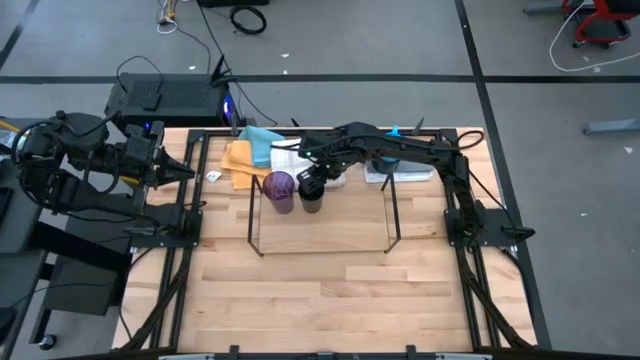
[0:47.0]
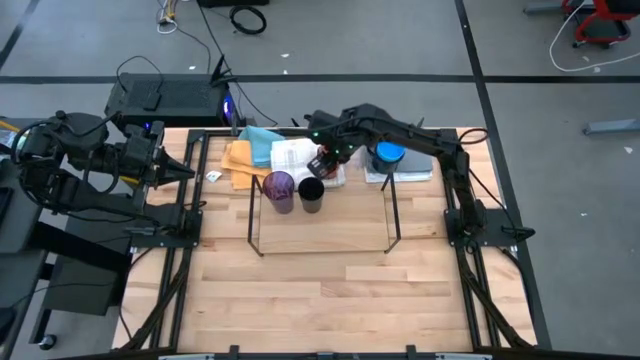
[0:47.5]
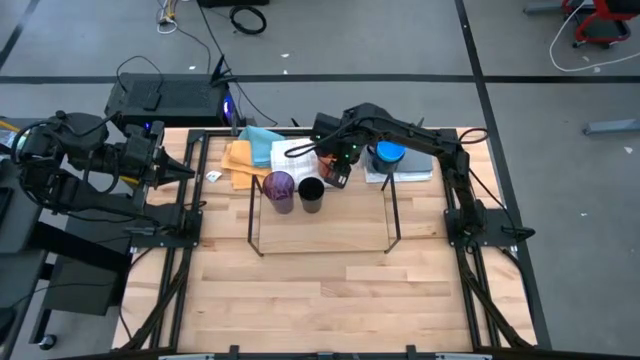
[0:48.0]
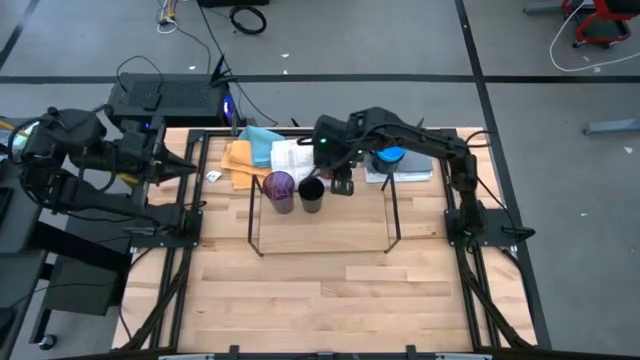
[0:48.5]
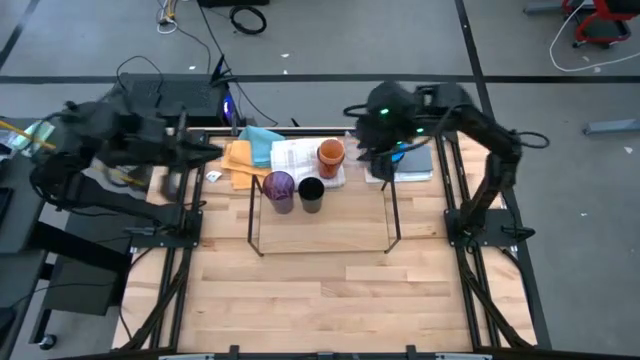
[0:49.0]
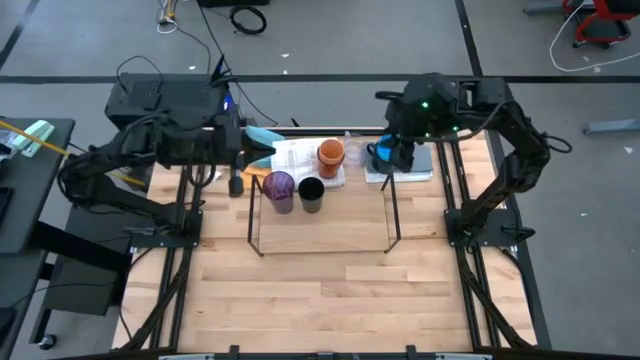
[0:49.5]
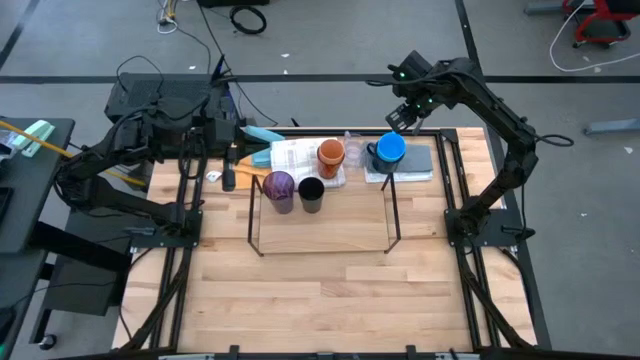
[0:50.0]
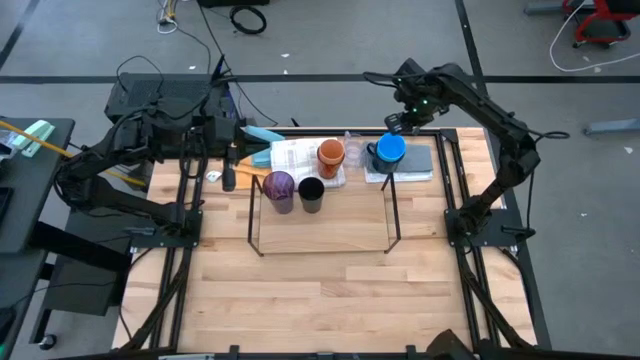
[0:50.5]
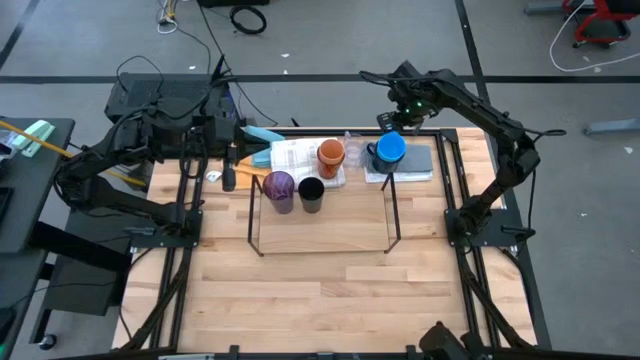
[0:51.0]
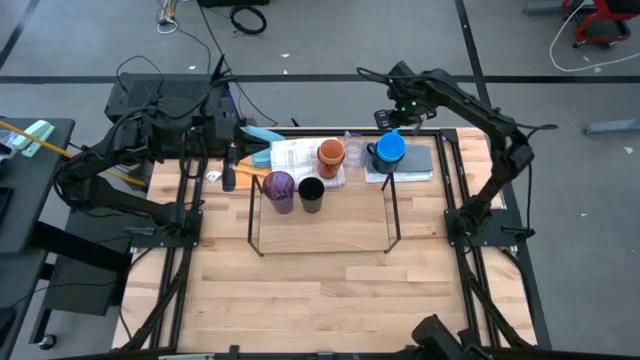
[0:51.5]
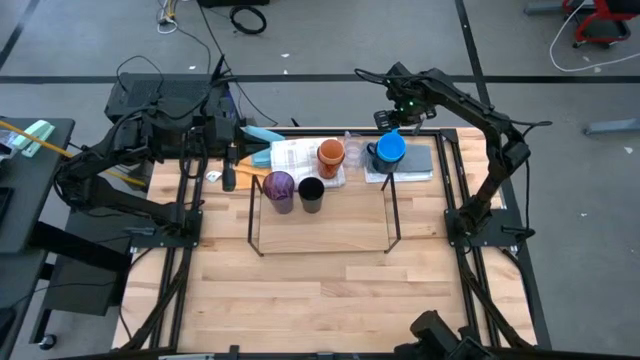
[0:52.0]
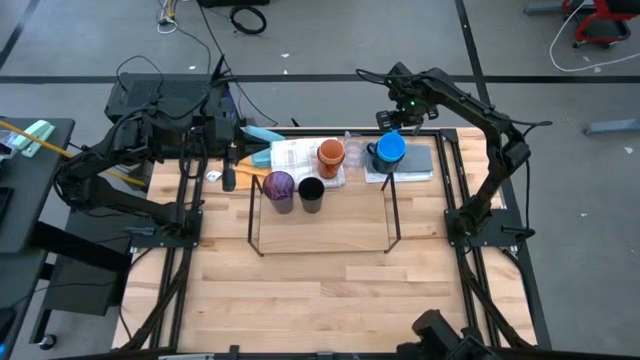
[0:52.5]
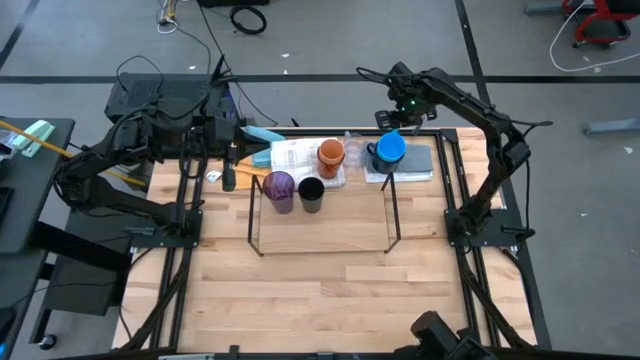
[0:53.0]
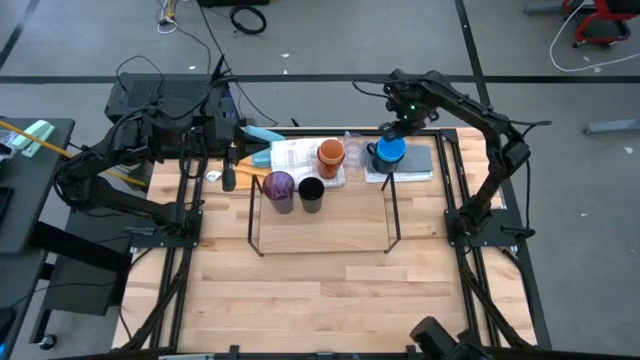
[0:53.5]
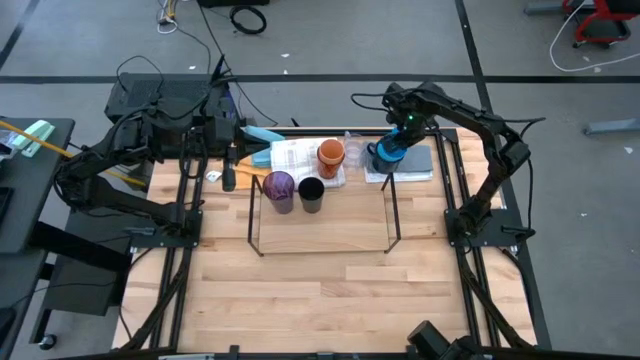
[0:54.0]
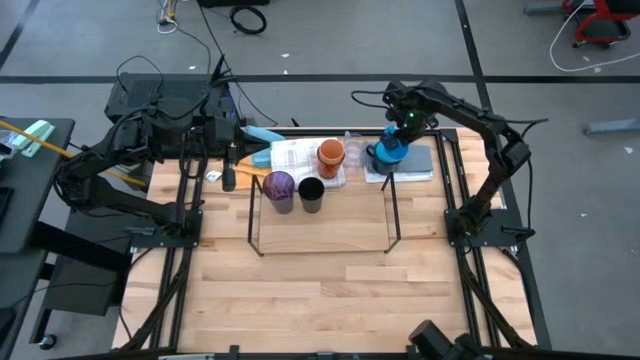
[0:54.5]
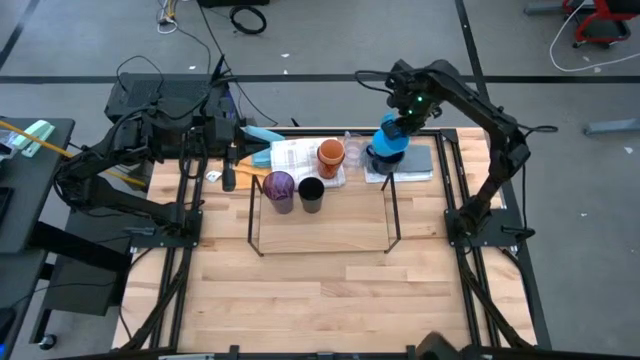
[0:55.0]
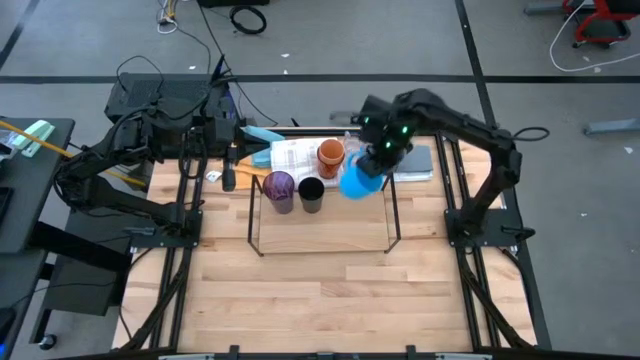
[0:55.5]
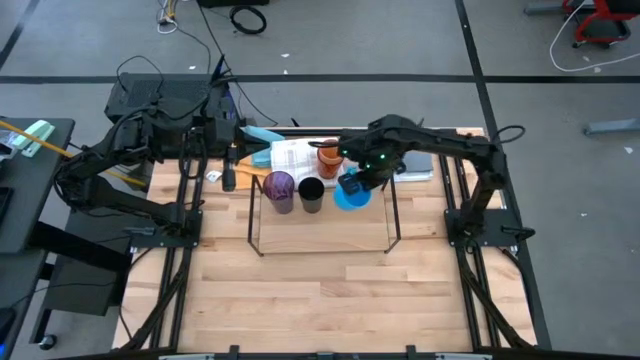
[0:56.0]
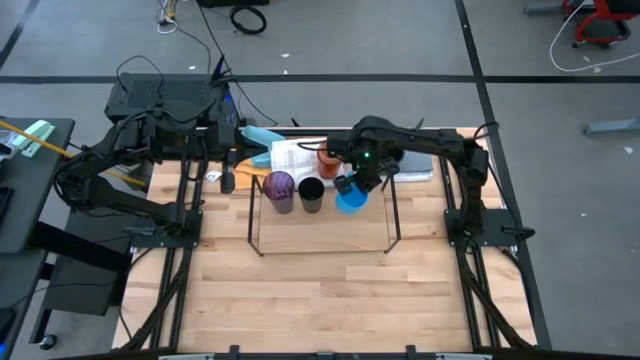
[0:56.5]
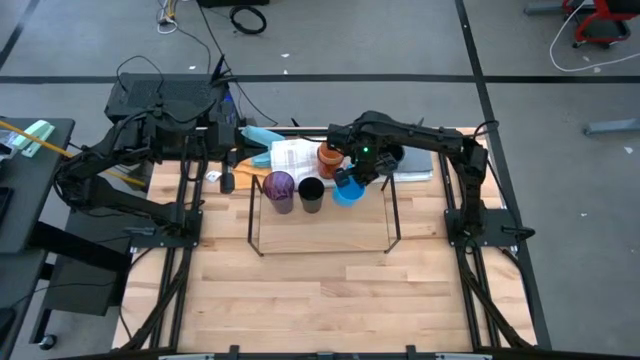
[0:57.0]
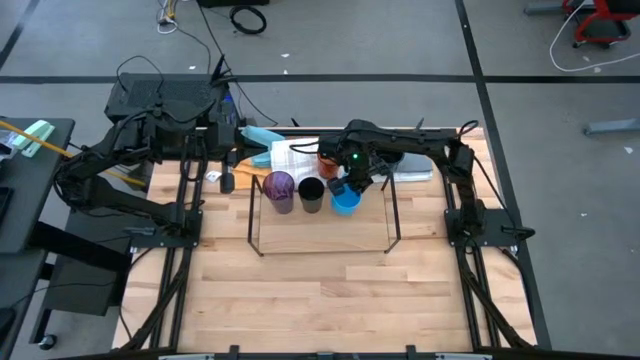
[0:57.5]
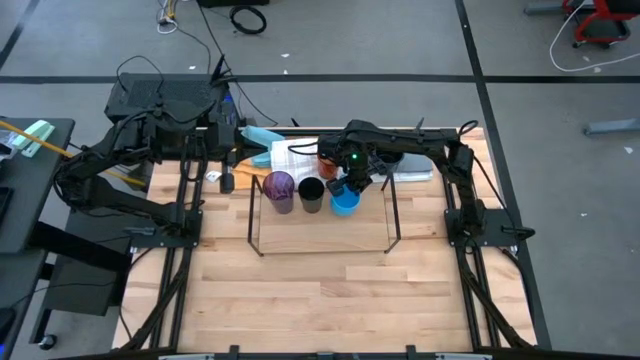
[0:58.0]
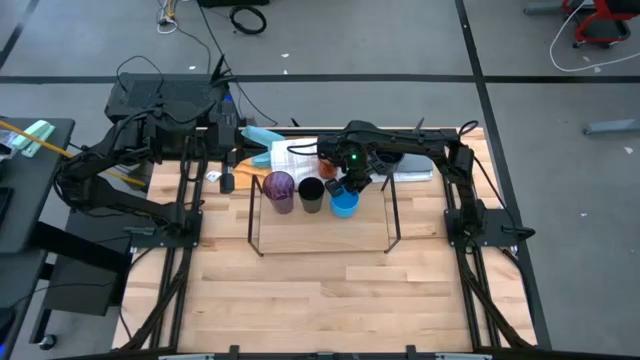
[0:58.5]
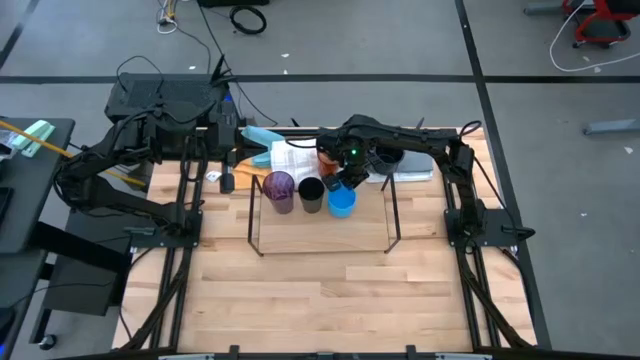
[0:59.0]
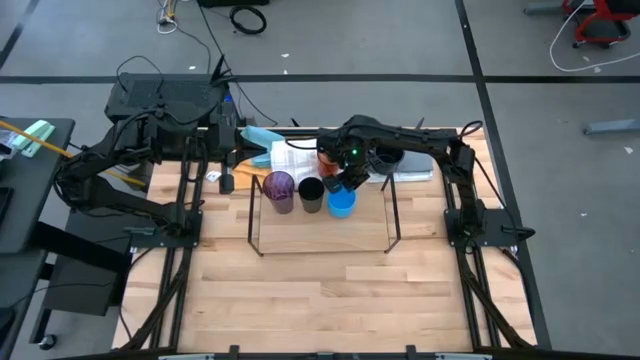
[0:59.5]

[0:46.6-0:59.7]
Task: Stack small to large cups/mugs on shelf
Put the blue mug on the shelf

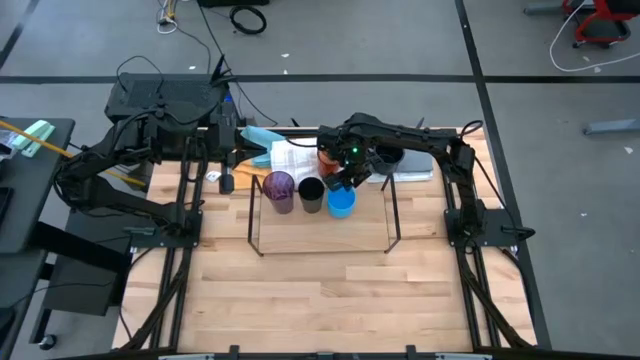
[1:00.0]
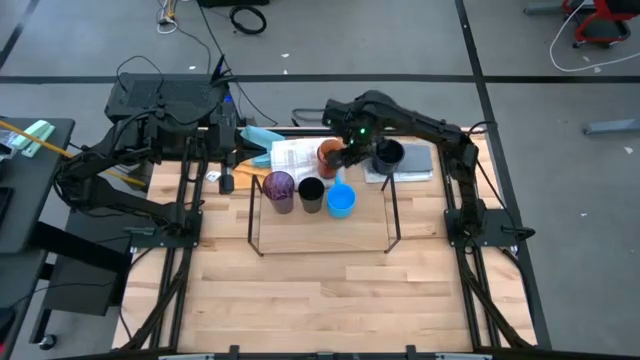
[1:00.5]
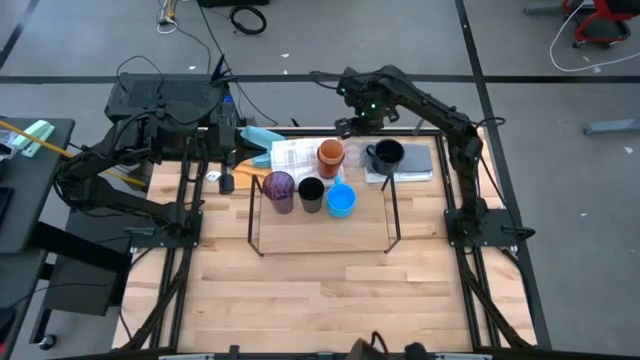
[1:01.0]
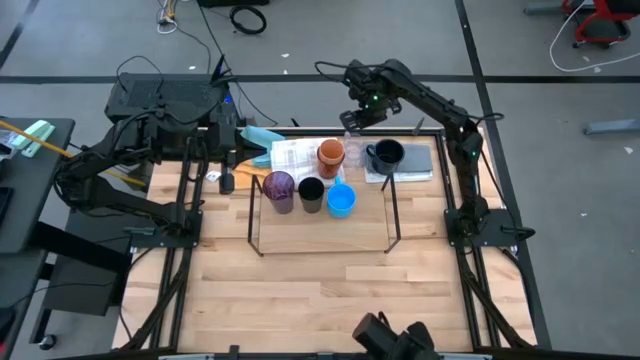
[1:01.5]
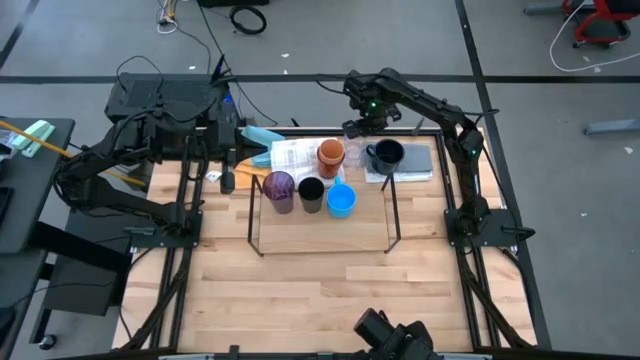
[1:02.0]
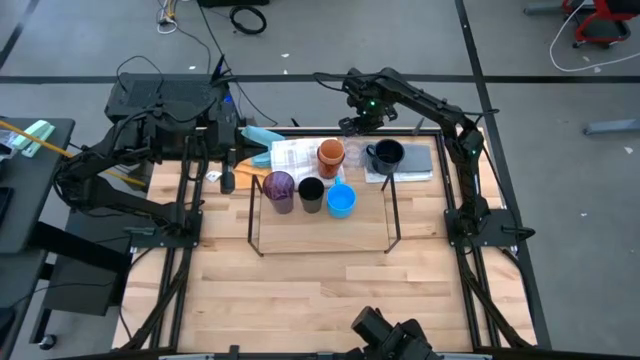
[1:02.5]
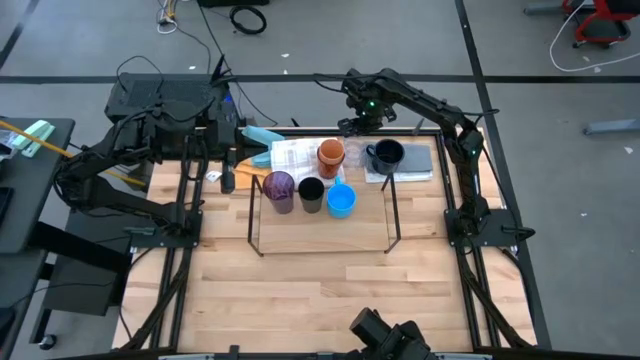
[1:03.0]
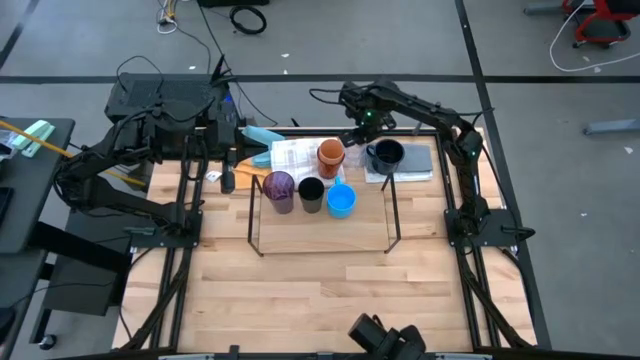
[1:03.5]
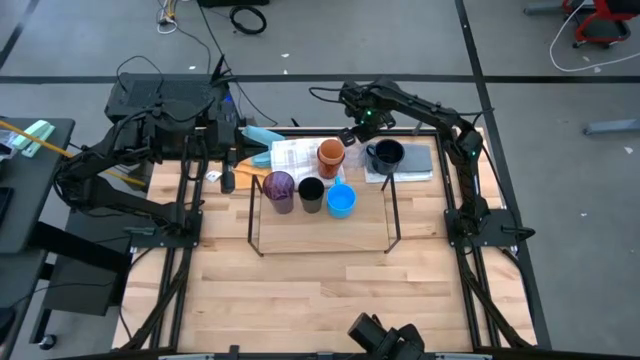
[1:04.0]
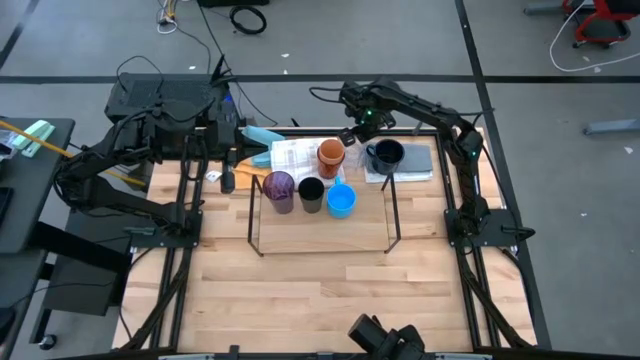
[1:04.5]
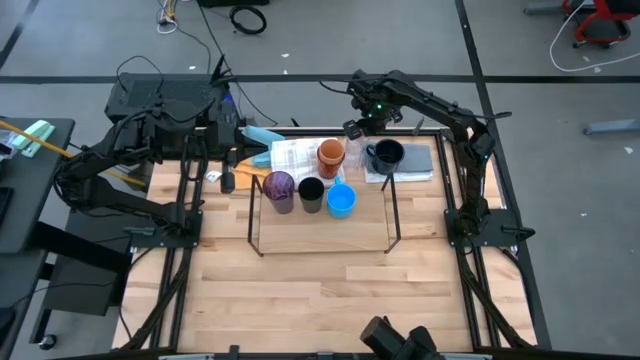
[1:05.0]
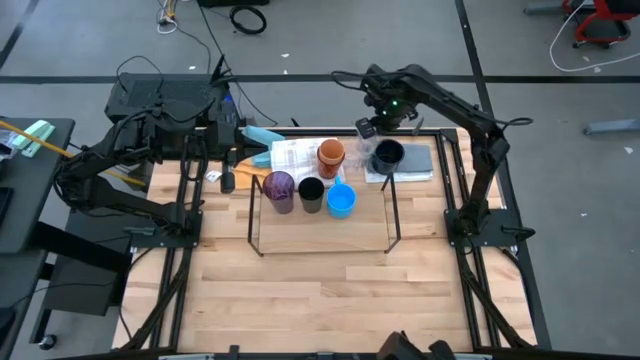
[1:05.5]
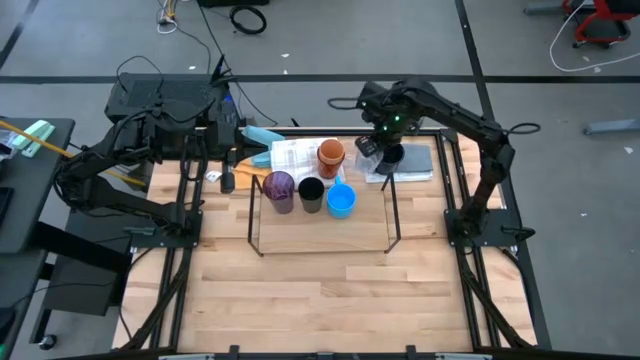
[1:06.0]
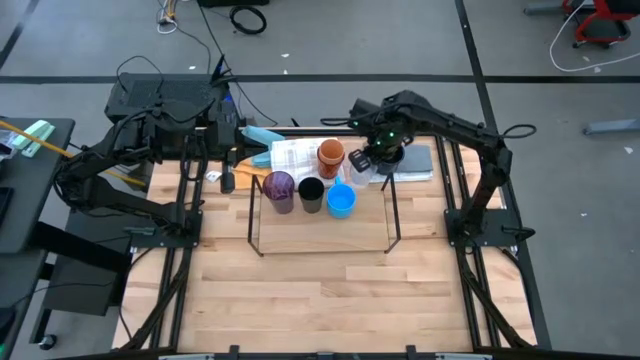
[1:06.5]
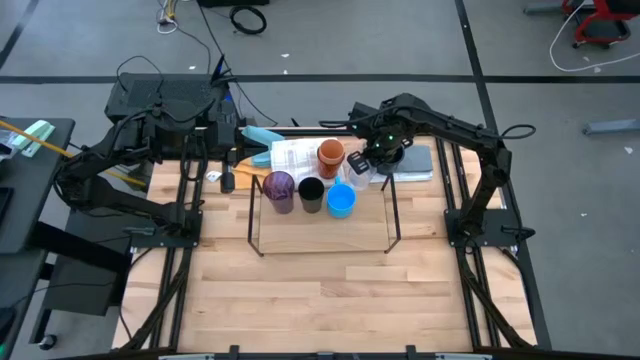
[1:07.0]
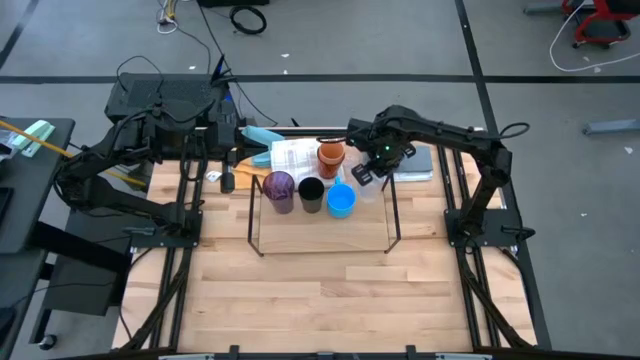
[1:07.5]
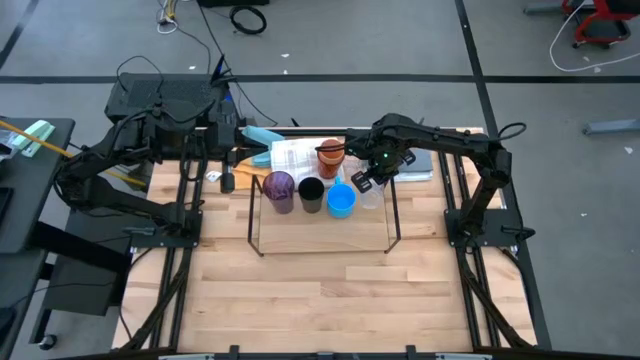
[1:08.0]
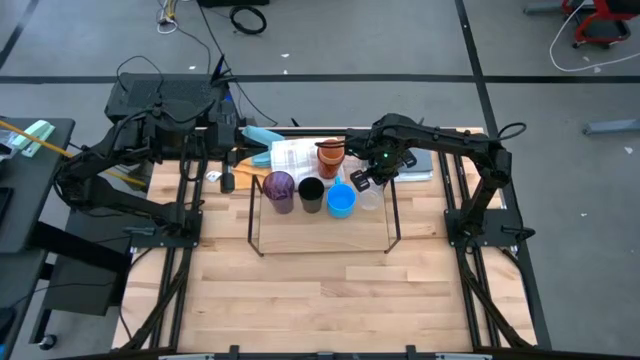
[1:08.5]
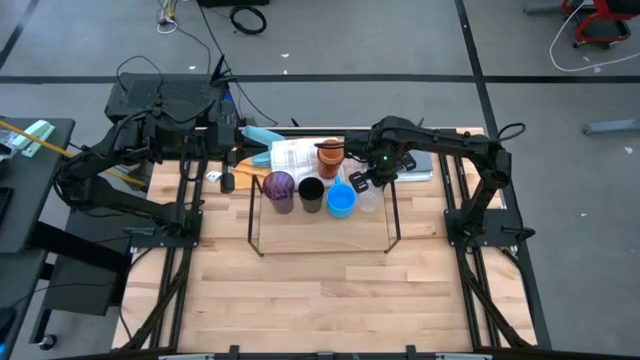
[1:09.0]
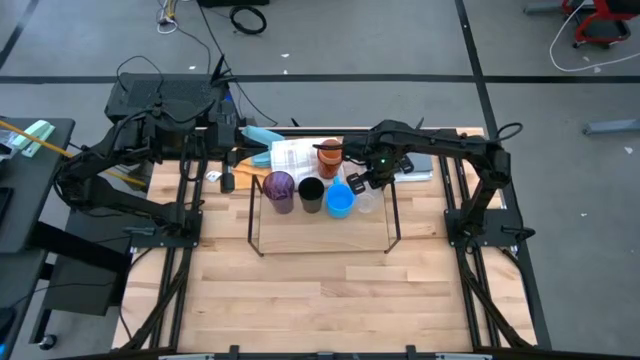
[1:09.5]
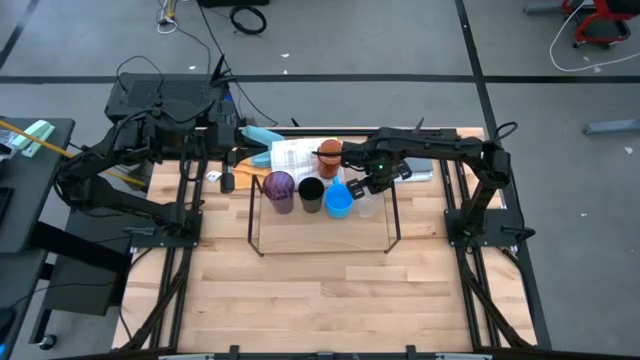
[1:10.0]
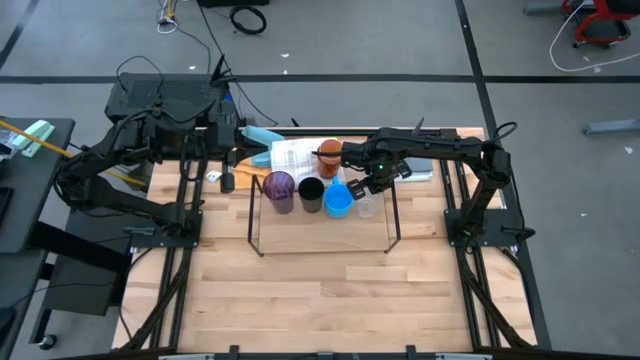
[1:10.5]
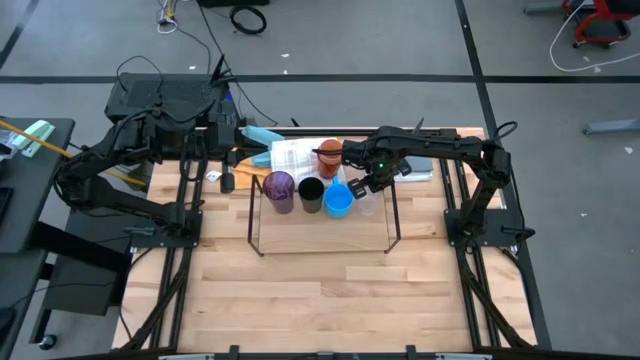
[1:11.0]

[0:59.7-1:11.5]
Put the top transparent mug on the shelf
